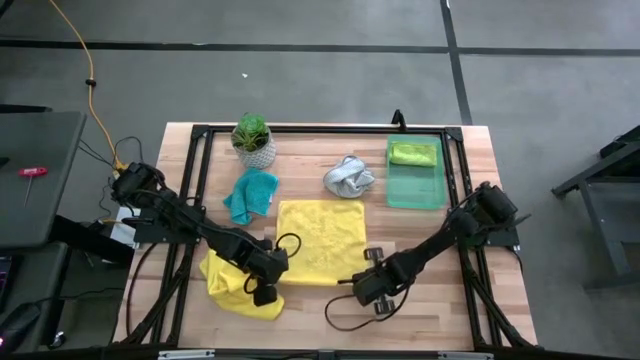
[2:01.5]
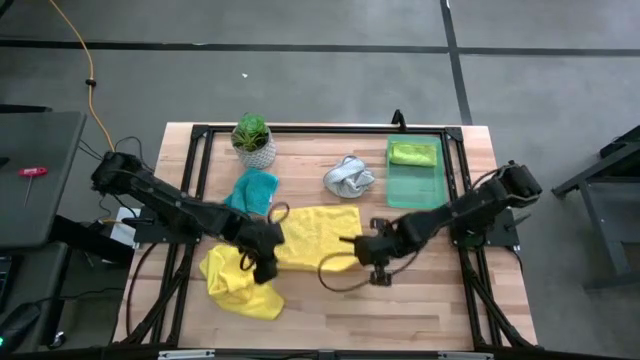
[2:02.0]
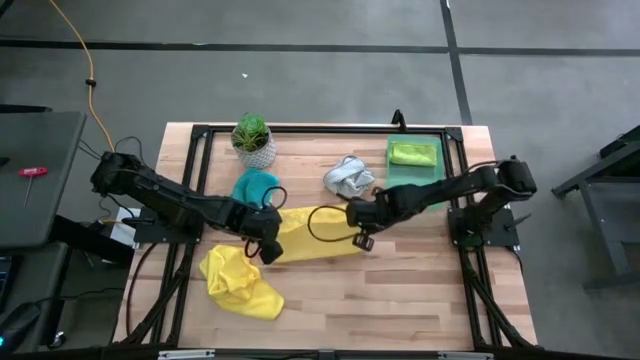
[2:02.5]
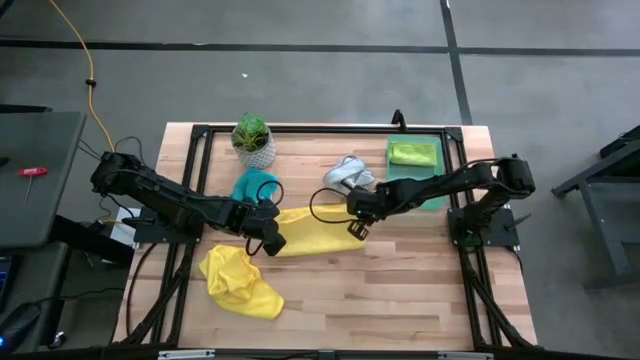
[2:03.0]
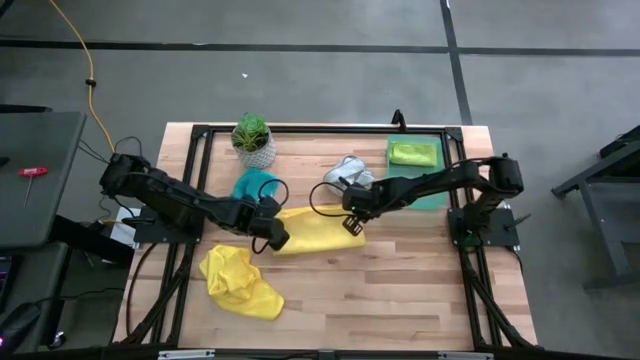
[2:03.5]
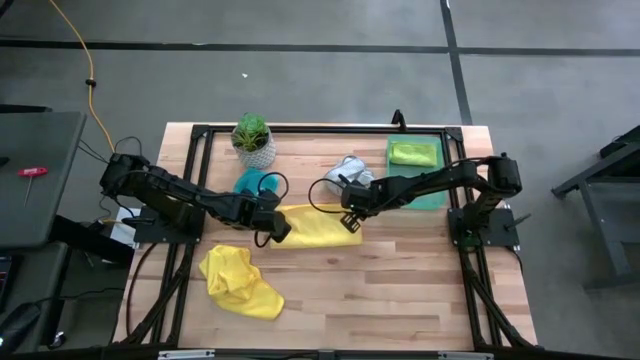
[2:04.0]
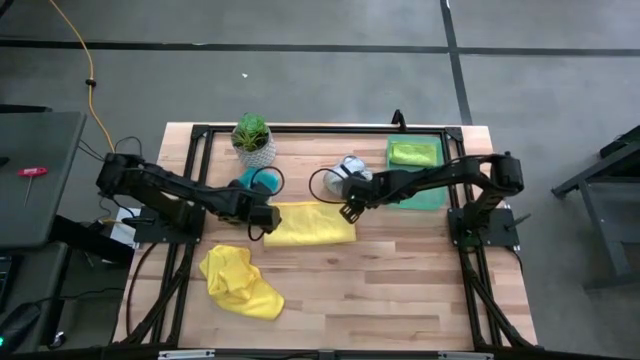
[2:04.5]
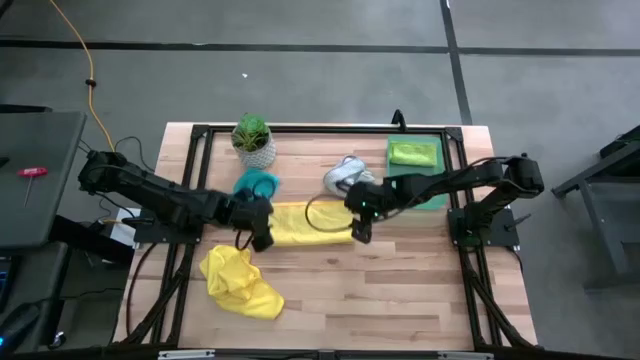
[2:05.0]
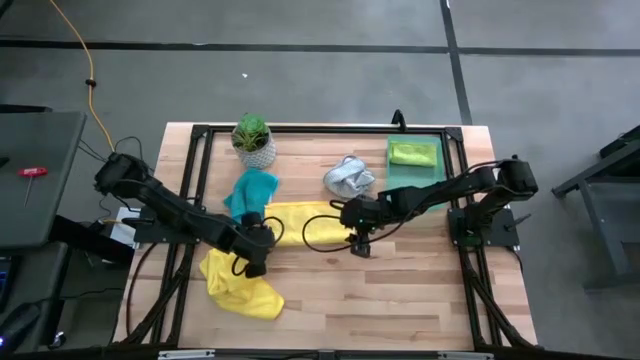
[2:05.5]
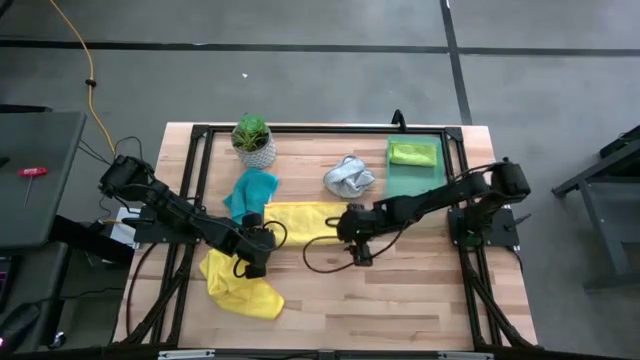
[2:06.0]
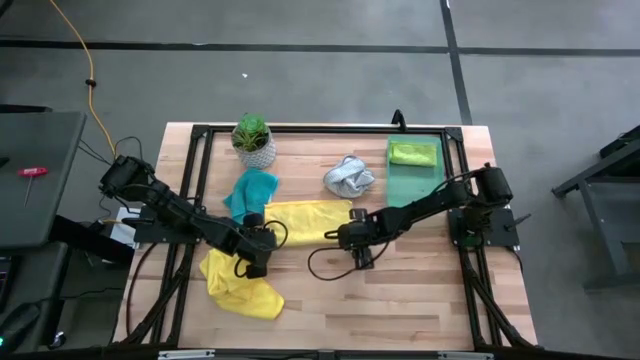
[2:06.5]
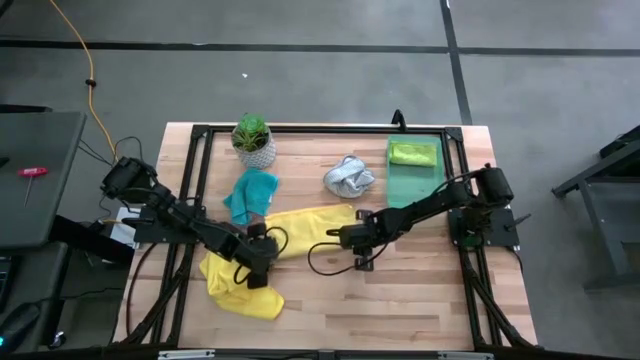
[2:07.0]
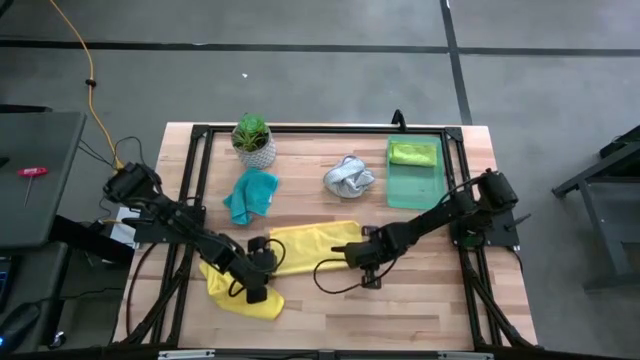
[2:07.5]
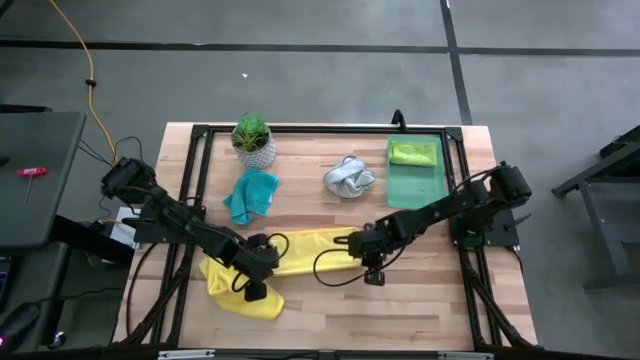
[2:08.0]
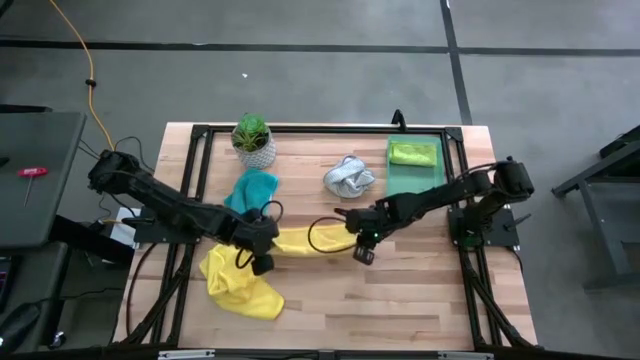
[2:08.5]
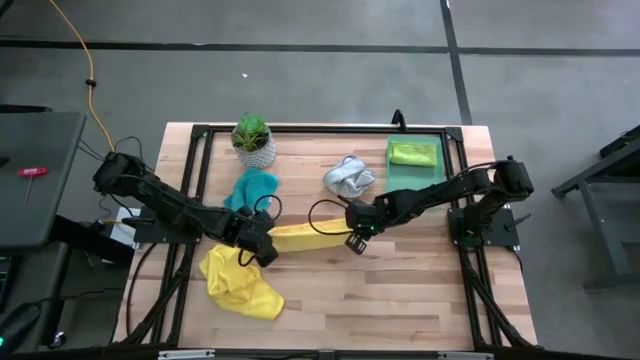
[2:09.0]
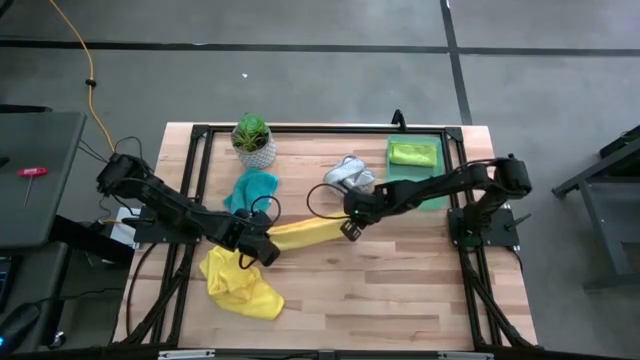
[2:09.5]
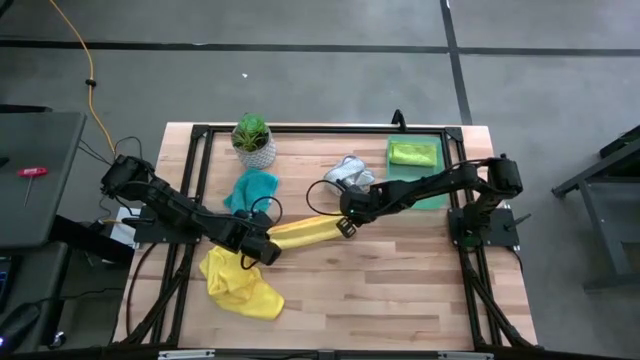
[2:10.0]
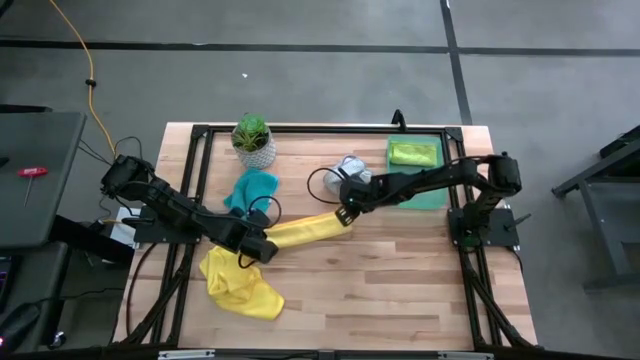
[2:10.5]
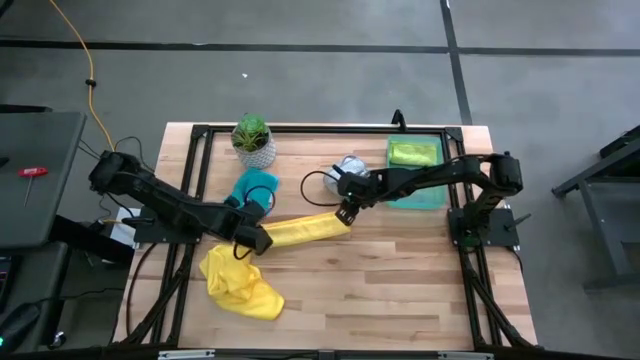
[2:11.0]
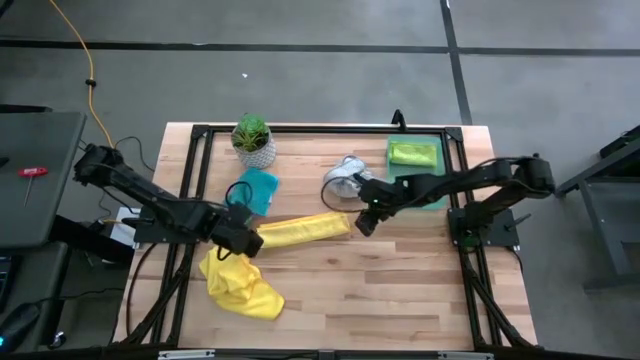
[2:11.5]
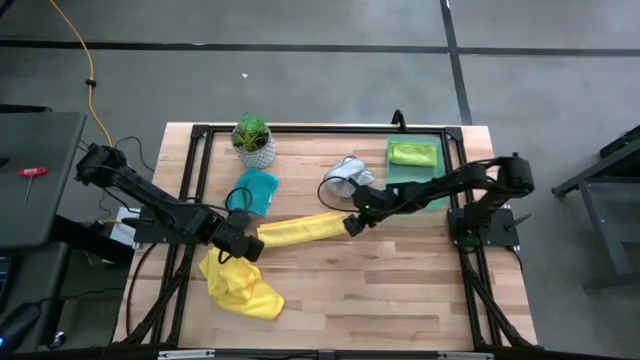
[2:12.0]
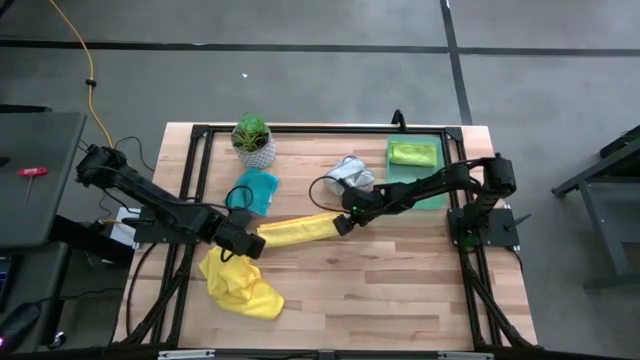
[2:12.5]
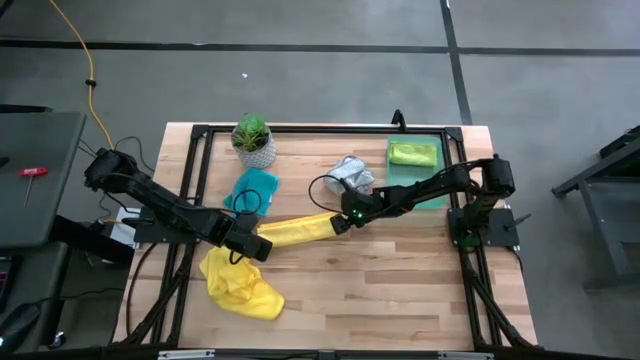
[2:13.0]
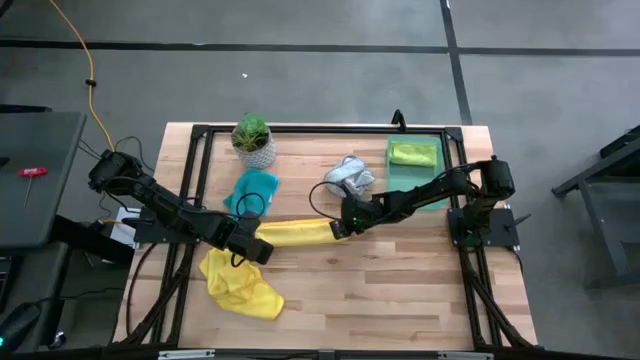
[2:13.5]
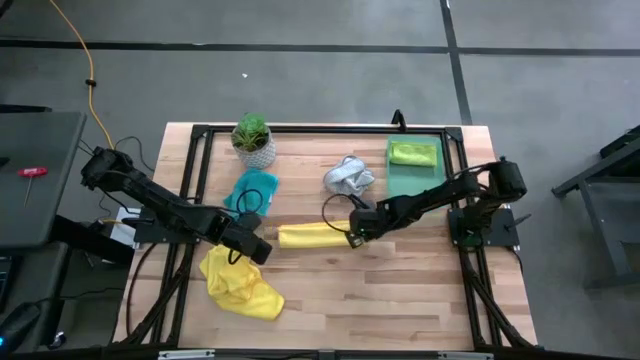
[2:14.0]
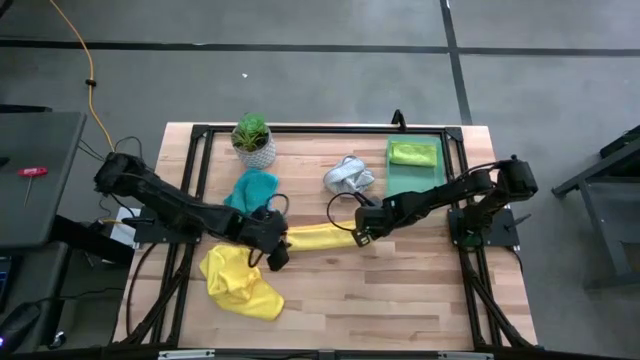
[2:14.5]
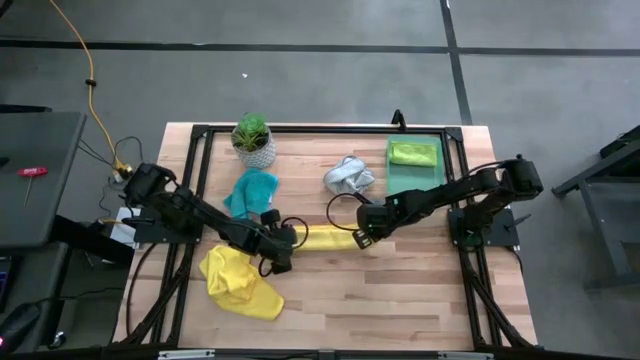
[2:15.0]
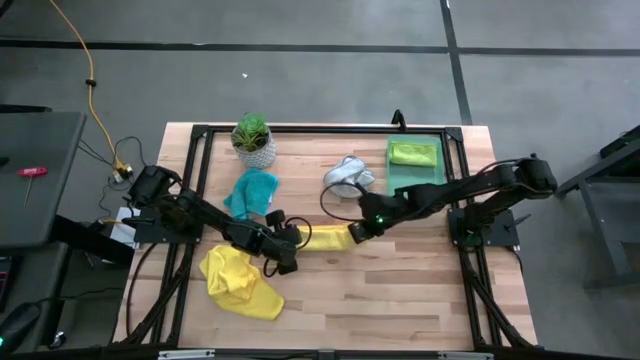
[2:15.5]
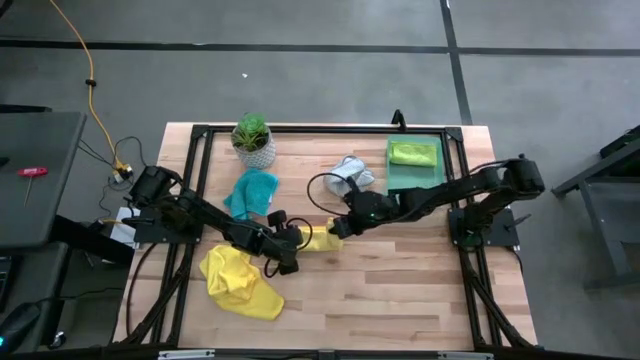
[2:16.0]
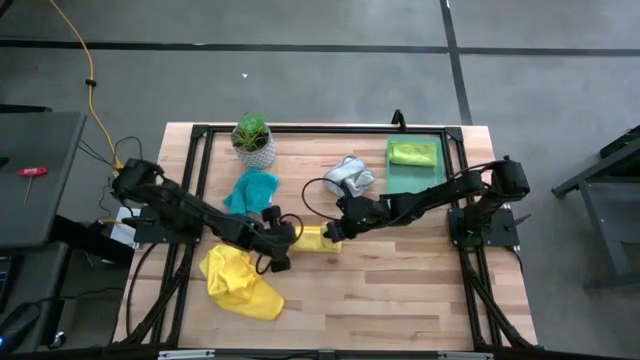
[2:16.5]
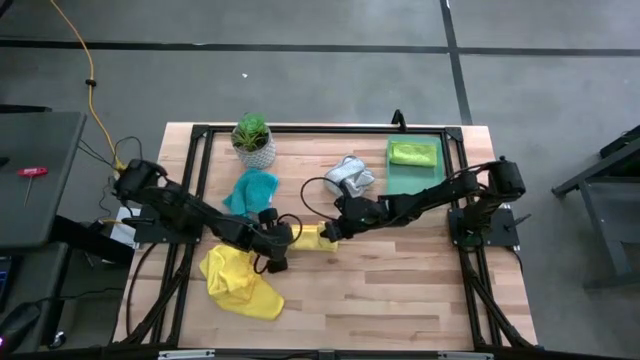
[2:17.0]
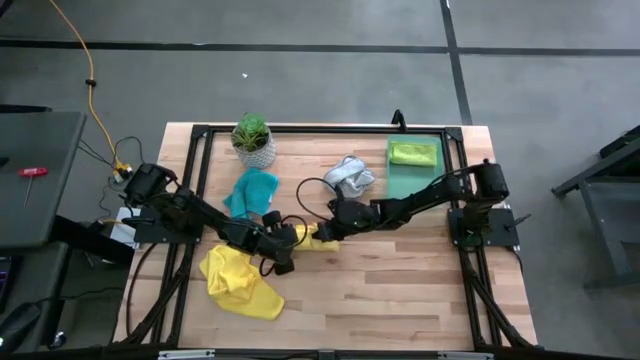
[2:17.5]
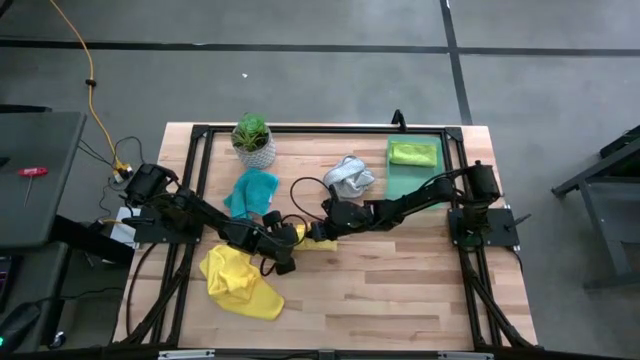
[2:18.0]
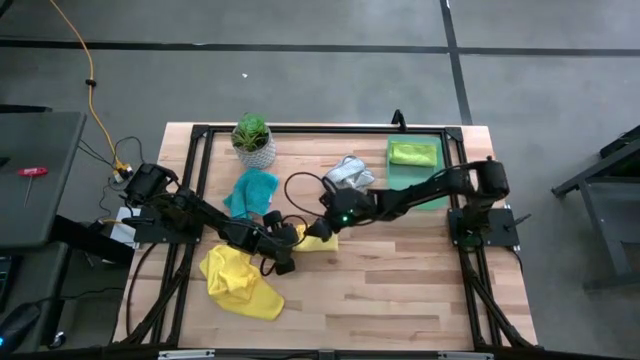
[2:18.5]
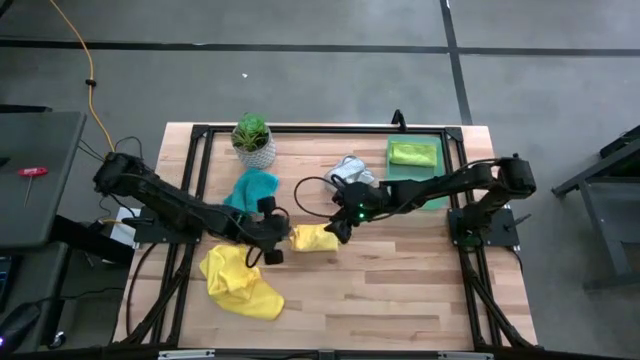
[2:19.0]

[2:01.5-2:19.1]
Task: Fold microfiber towels
Fold the right yellow microfiber cloth

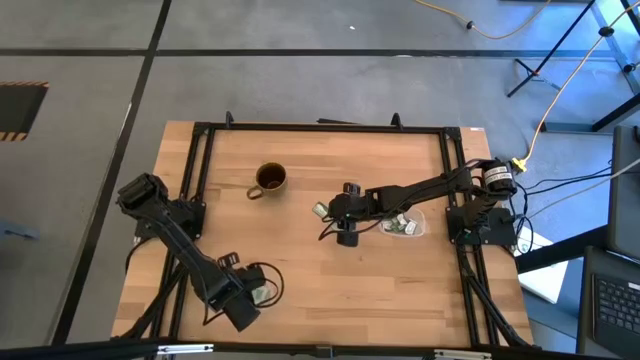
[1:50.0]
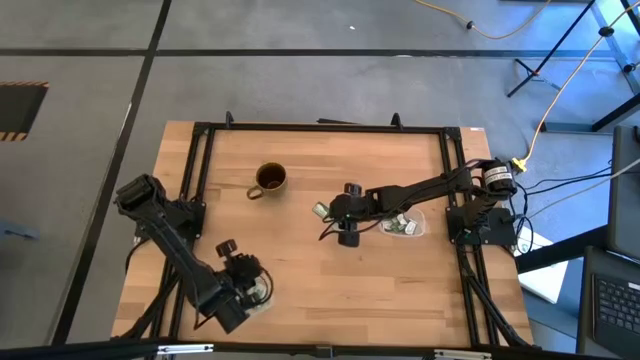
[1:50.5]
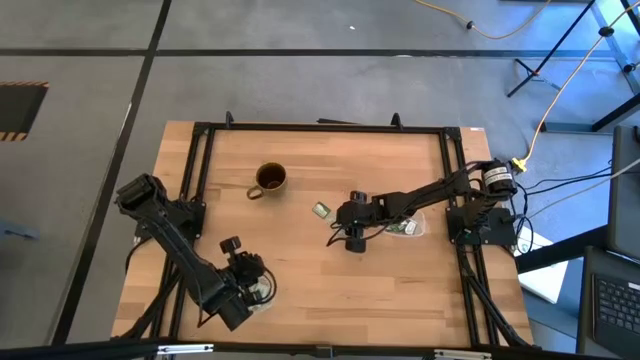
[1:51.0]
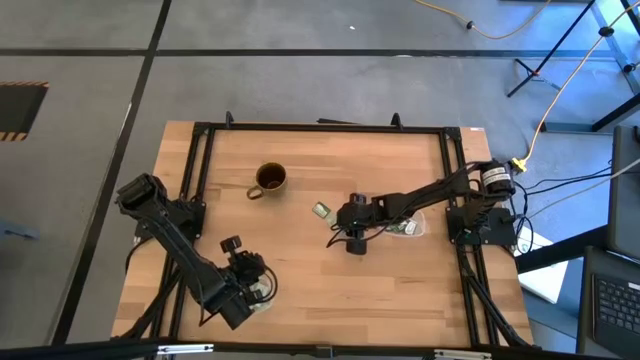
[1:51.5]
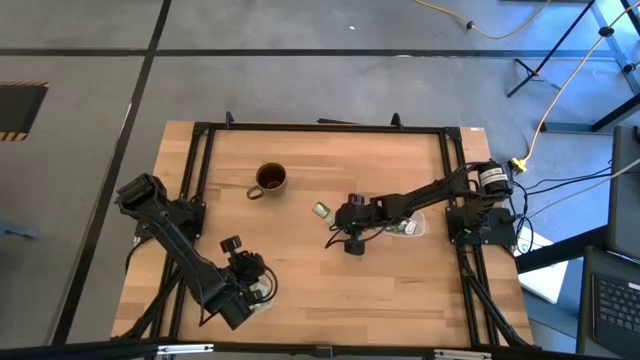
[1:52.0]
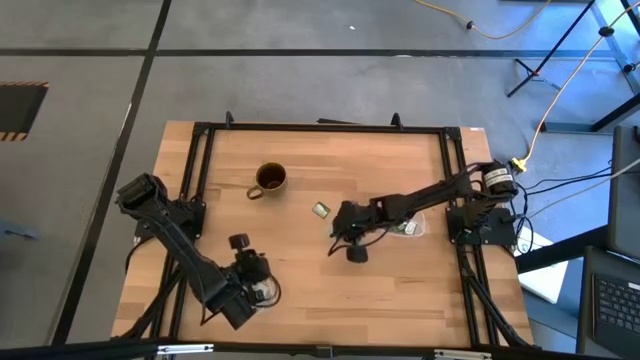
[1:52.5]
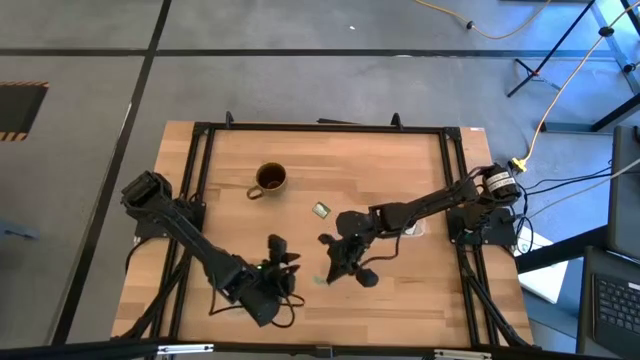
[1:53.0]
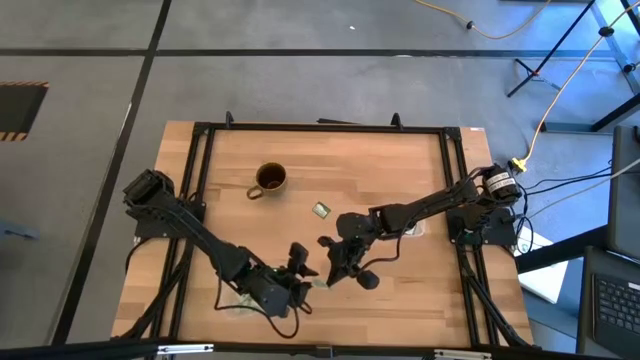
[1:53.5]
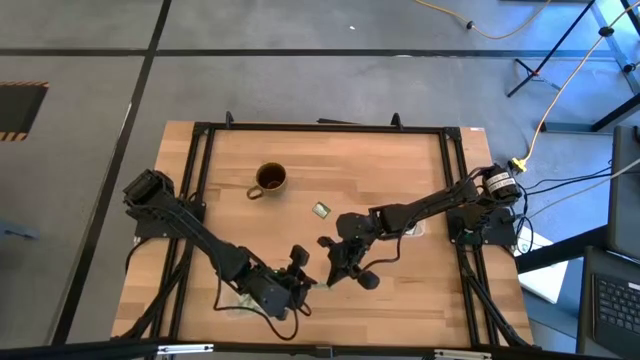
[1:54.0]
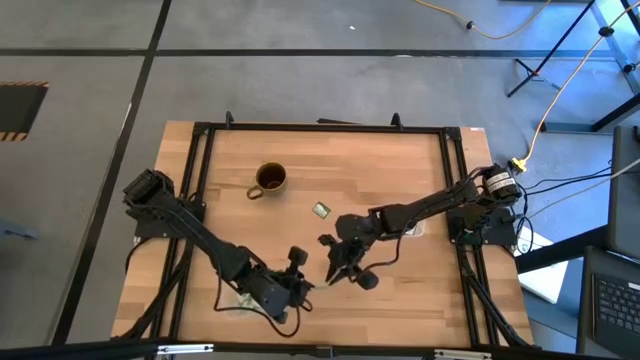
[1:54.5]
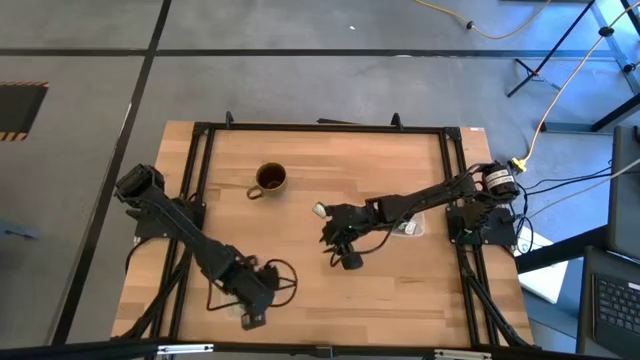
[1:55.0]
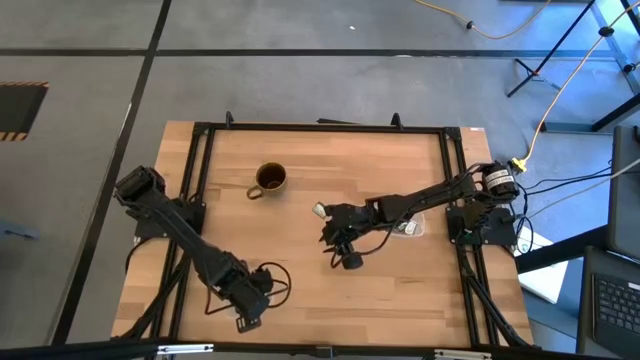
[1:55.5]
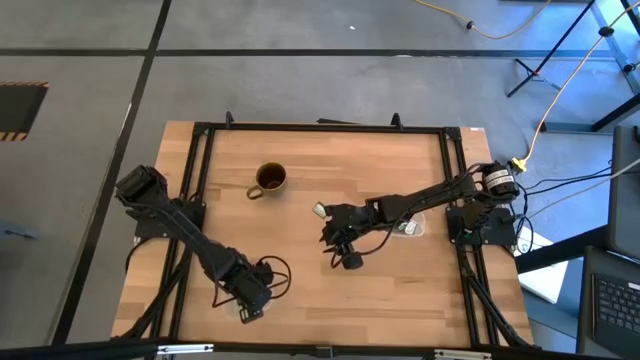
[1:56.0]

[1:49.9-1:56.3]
Task: Pick and place Stevia / Truvia into bins
Put the stevia packet into the bottom transparent container
